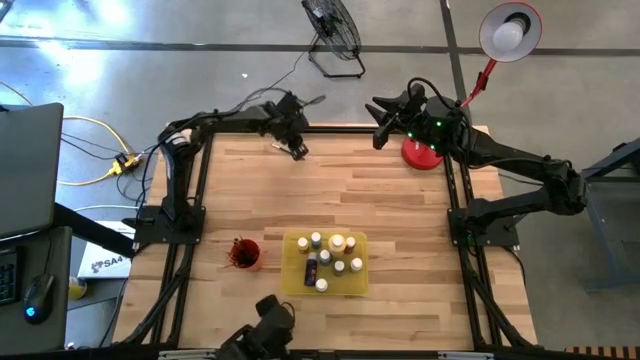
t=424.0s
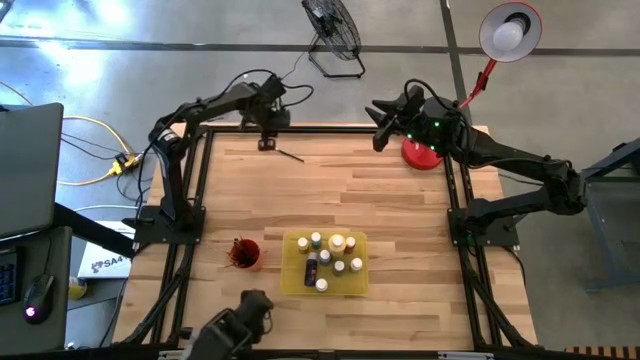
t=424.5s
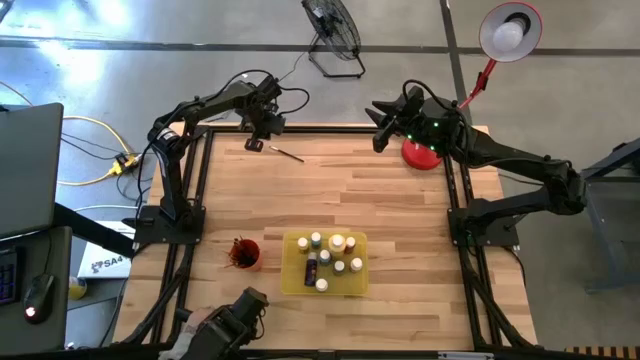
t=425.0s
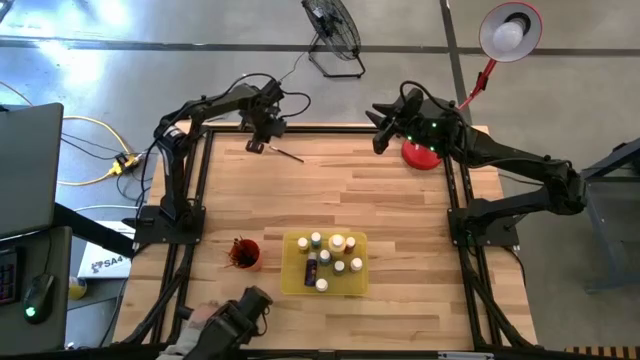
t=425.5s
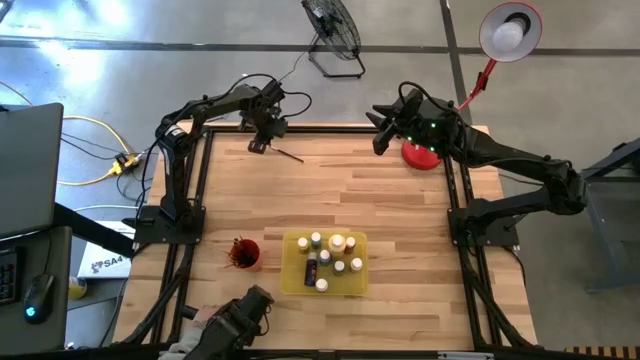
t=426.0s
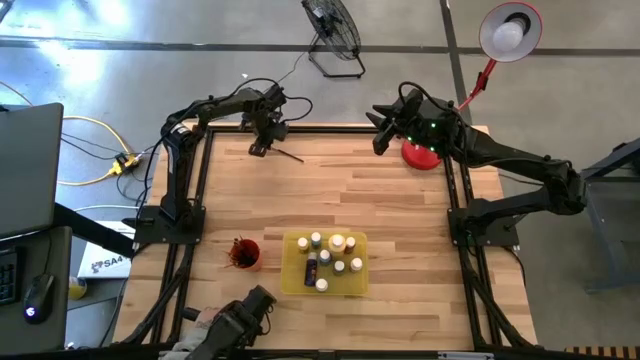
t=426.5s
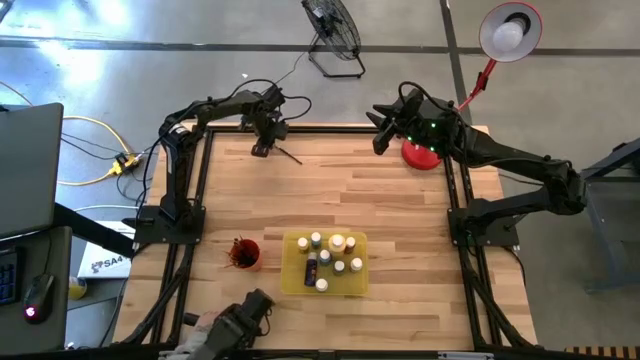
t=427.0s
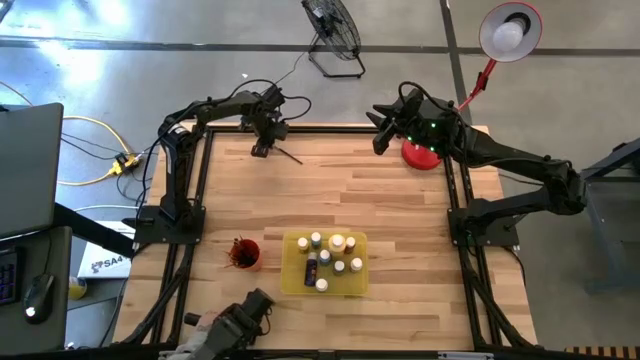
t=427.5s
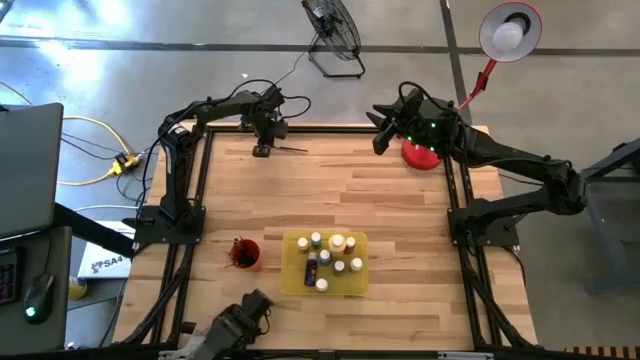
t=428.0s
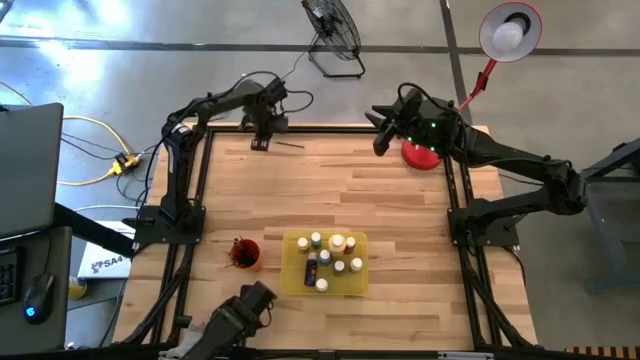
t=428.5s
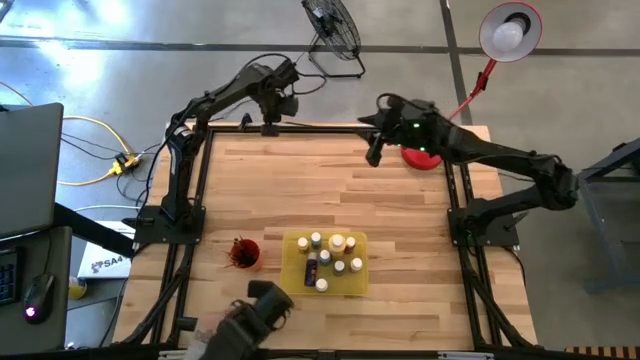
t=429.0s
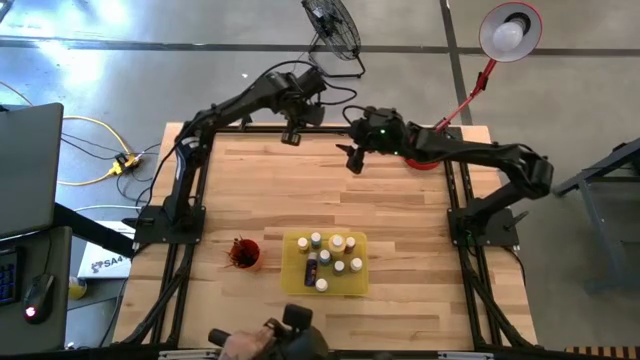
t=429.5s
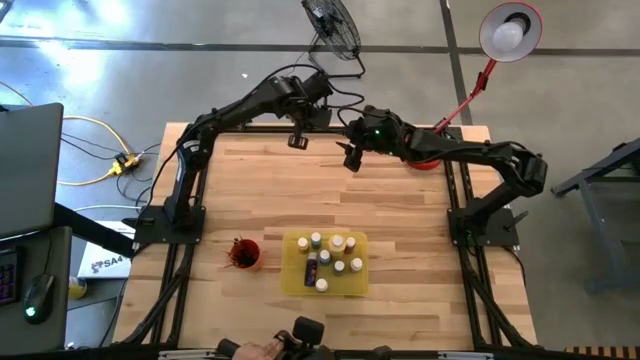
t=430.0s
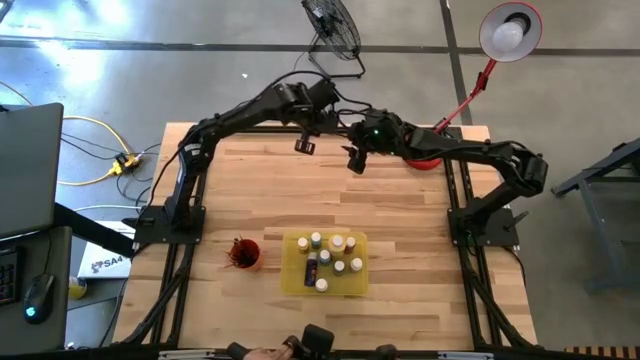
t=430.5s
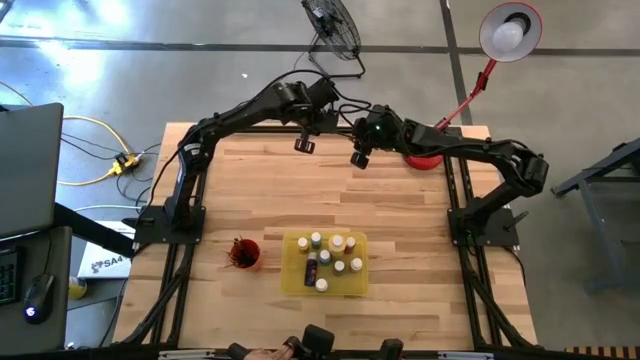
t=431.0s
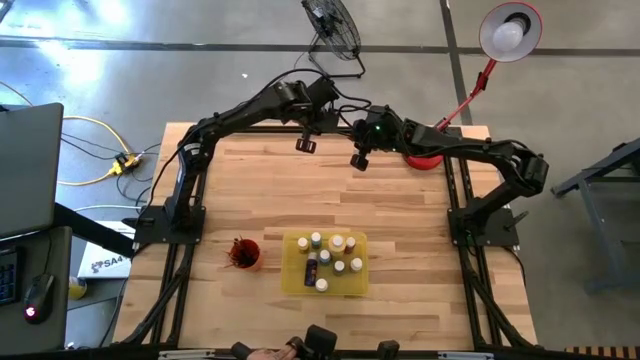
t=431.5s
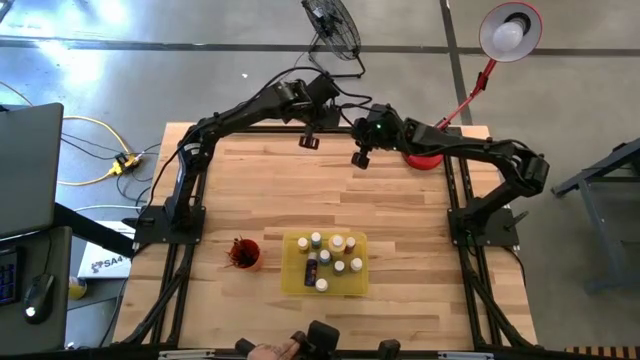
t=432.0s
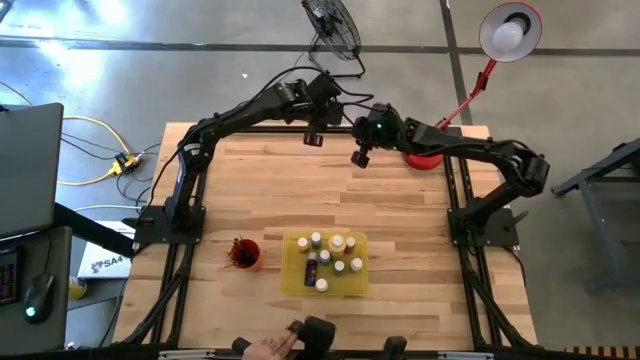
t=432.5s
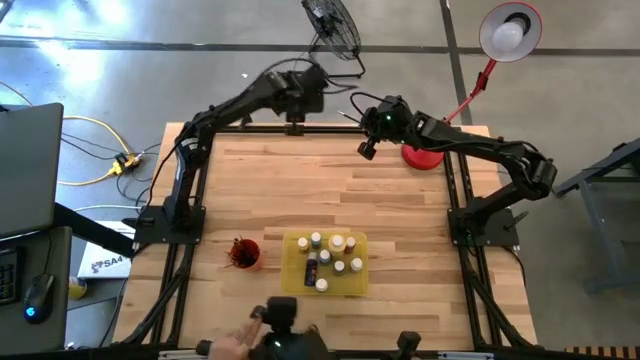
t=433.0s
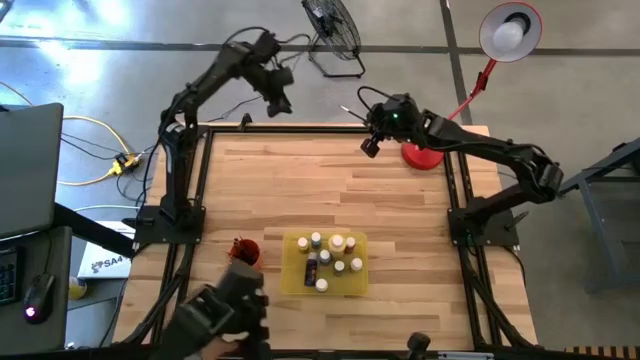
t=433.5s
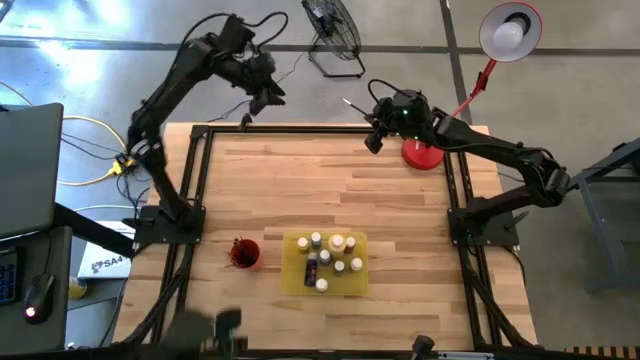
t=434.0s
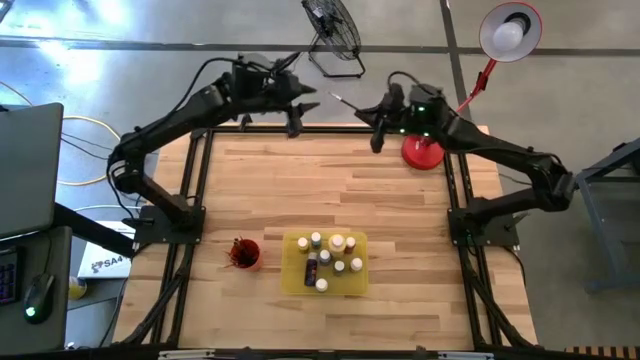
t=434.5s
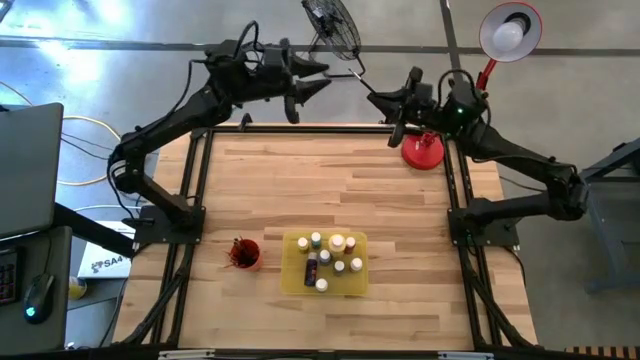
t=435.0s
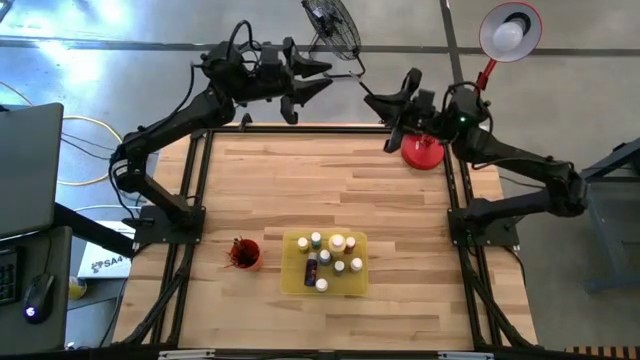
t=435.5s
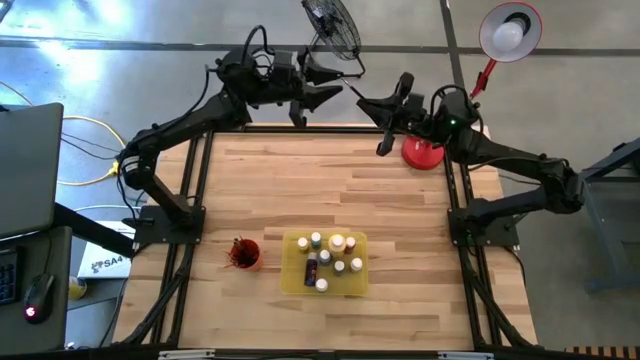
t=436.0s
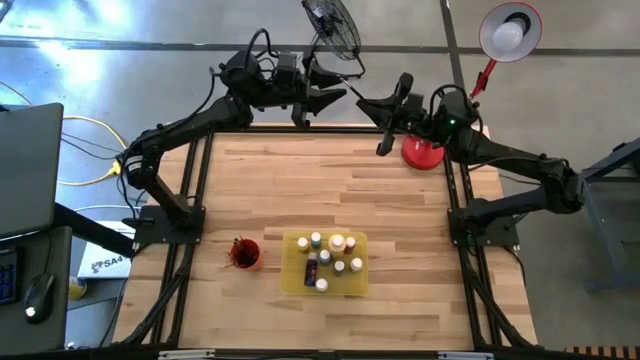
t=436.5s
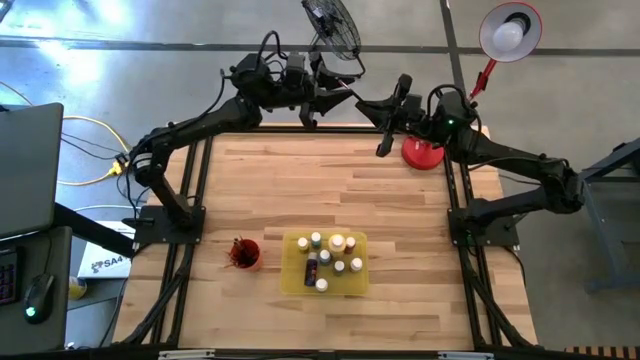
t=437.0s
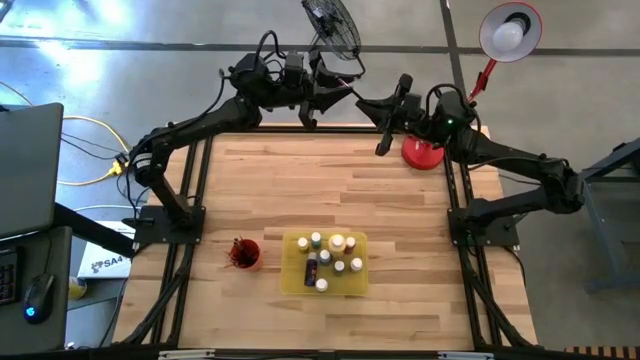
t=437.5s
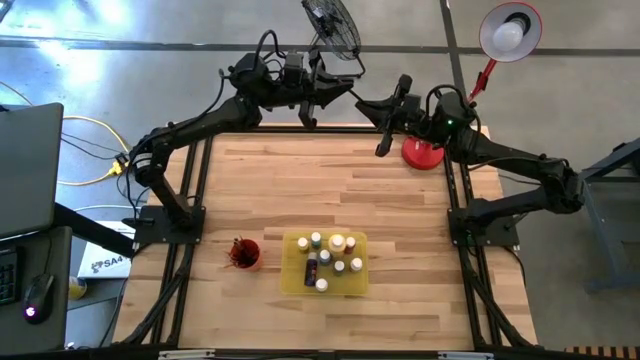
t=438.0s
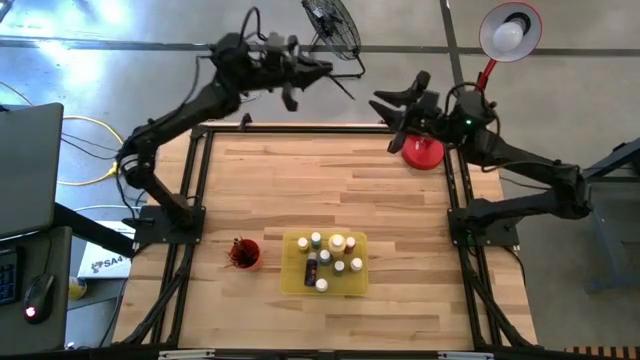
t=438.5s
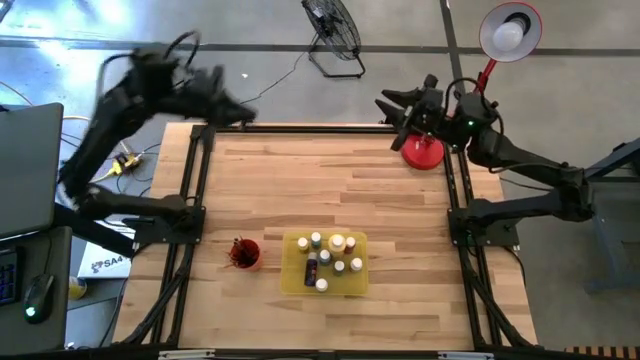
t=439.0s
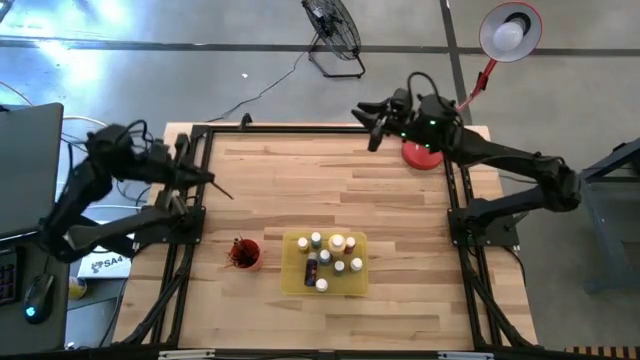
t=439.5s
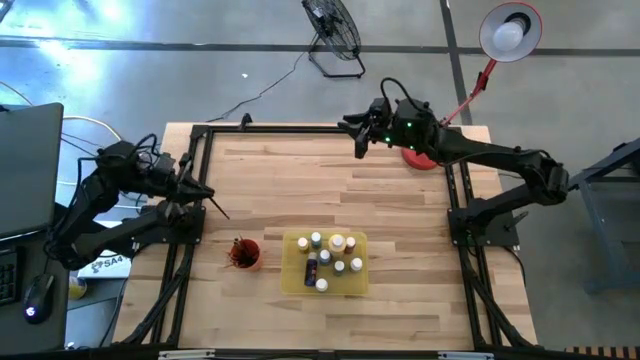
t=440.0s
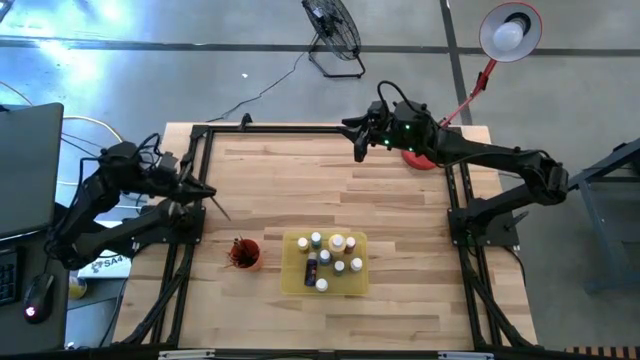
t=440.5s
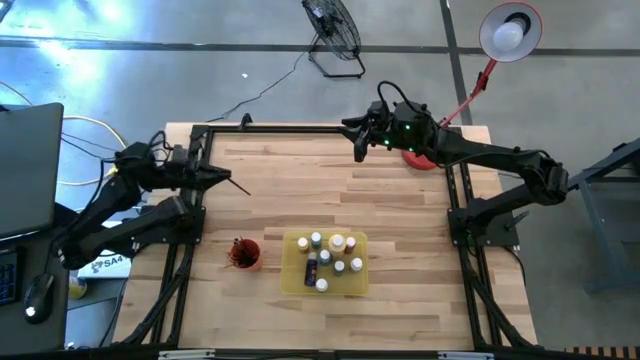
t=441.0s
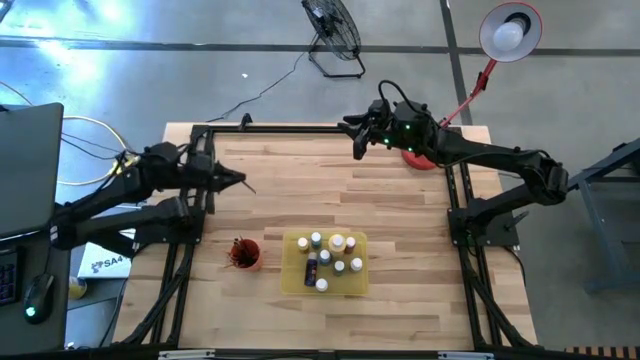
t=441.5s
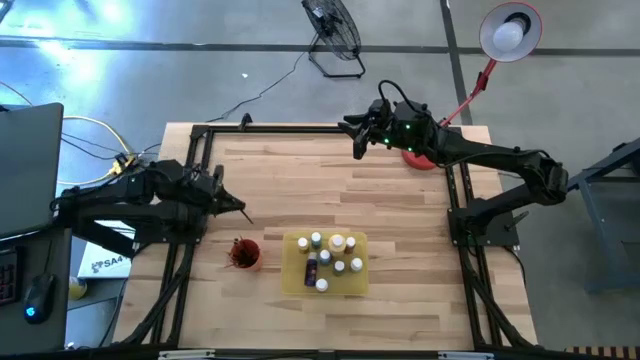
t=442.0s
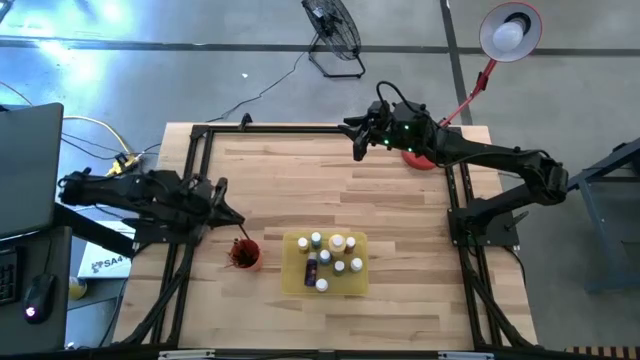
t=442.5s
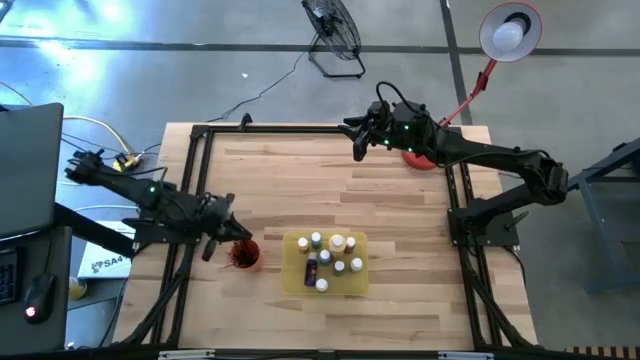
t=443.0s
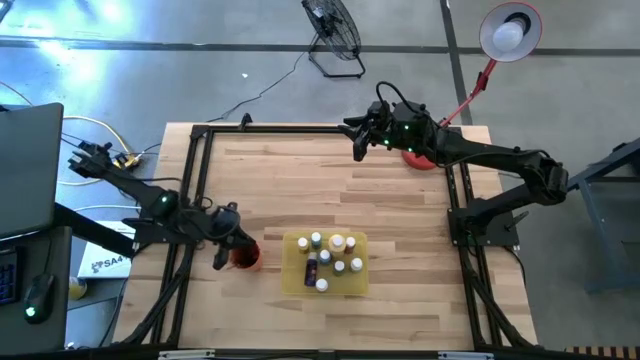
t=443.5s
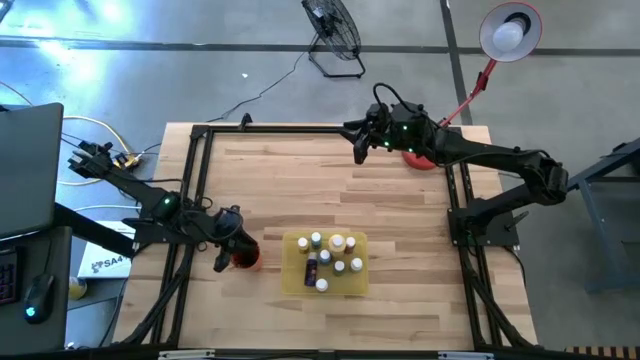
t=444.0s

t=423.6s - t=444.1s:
Task: Pick & Place Paint Supplies
Put the silver paint brush into the orange cup
